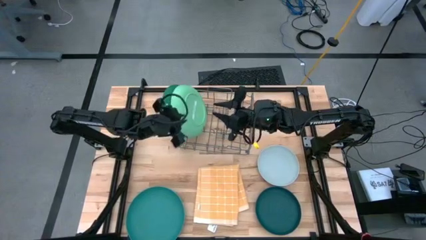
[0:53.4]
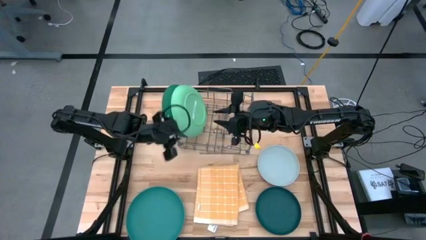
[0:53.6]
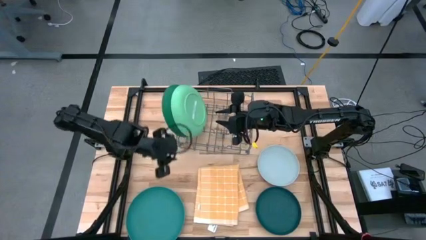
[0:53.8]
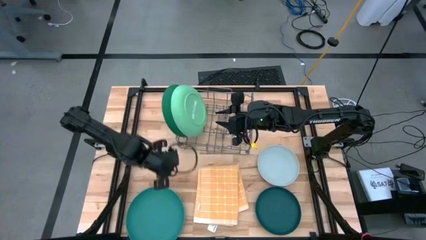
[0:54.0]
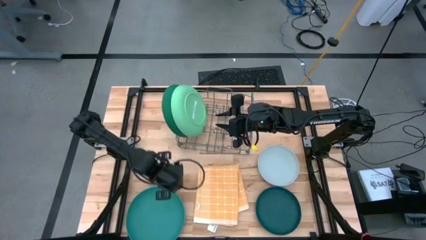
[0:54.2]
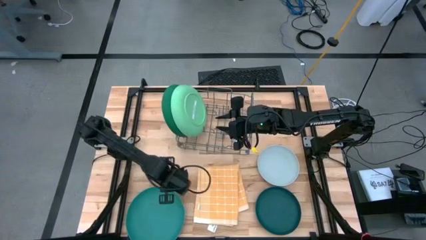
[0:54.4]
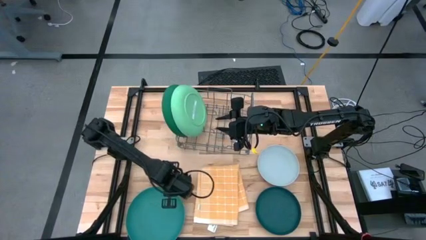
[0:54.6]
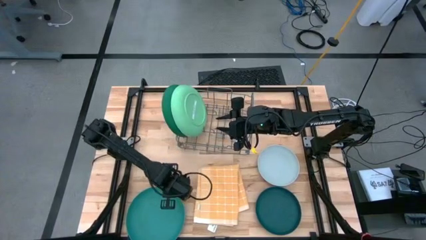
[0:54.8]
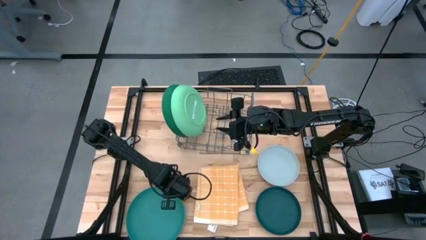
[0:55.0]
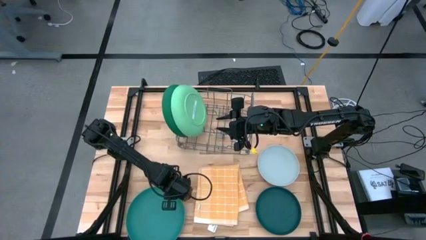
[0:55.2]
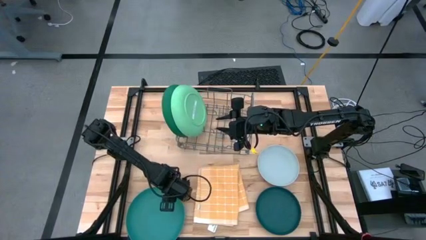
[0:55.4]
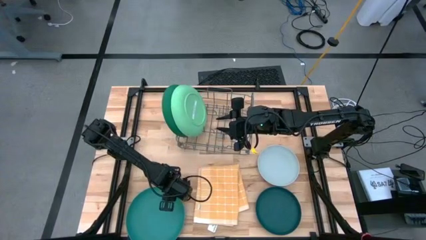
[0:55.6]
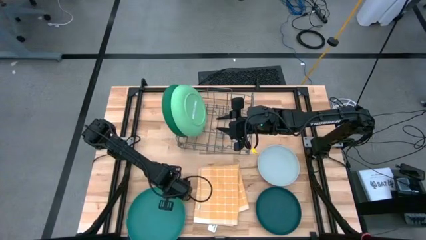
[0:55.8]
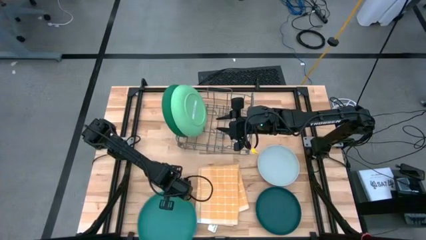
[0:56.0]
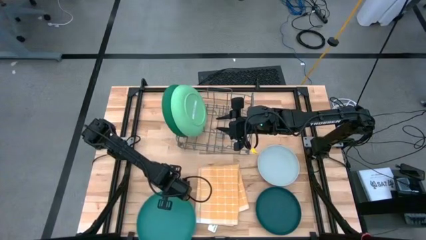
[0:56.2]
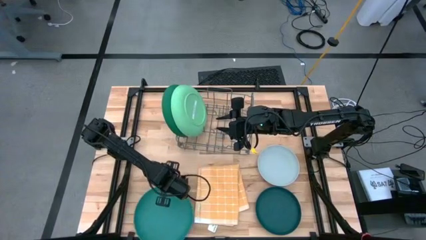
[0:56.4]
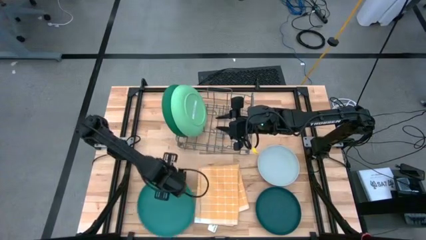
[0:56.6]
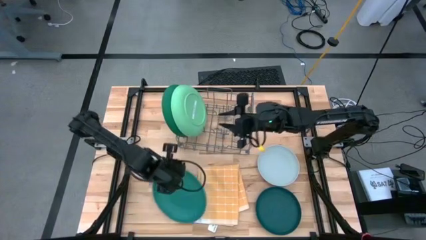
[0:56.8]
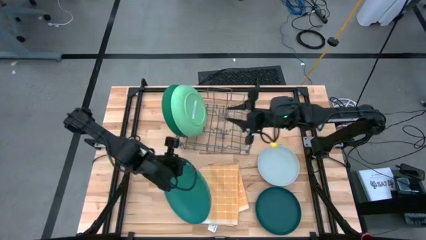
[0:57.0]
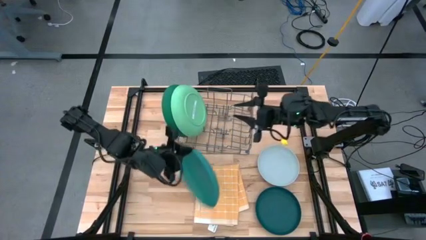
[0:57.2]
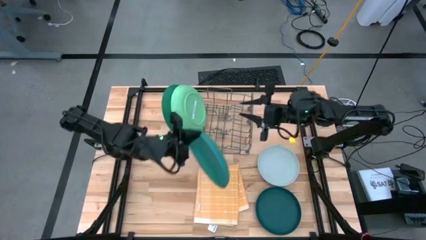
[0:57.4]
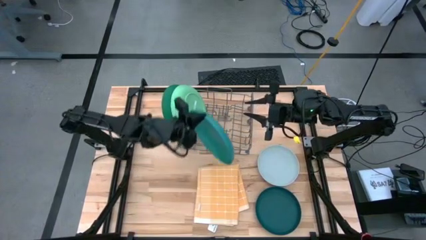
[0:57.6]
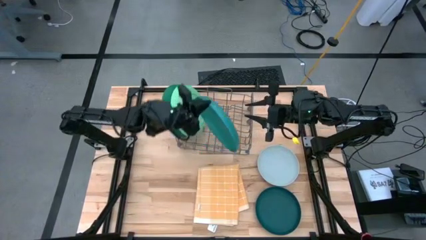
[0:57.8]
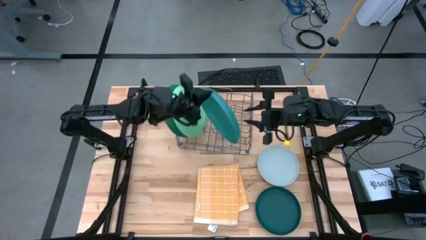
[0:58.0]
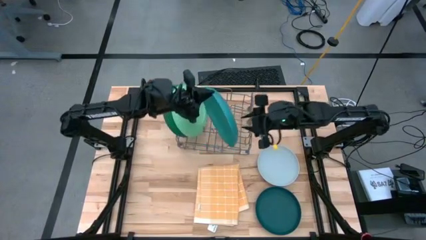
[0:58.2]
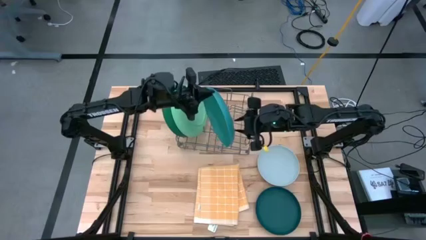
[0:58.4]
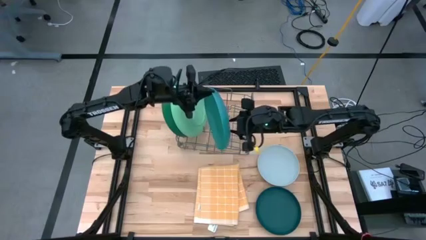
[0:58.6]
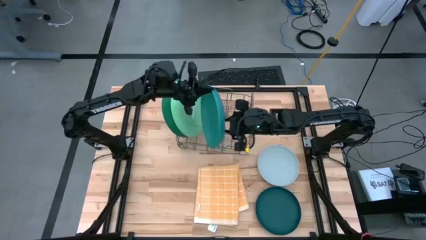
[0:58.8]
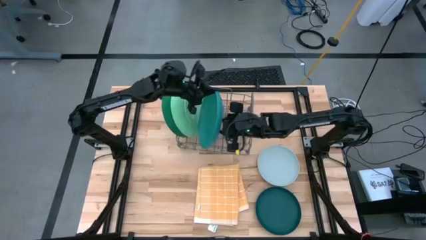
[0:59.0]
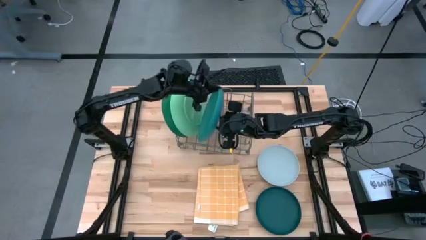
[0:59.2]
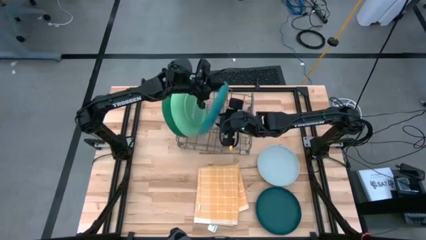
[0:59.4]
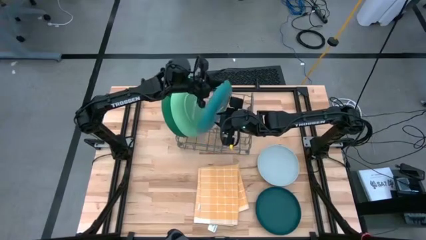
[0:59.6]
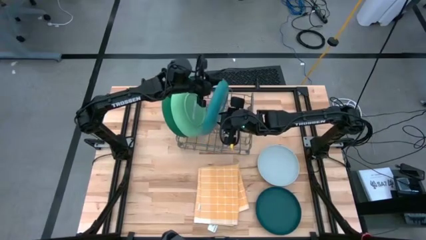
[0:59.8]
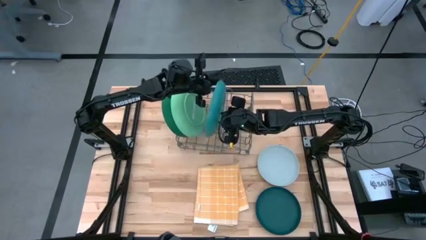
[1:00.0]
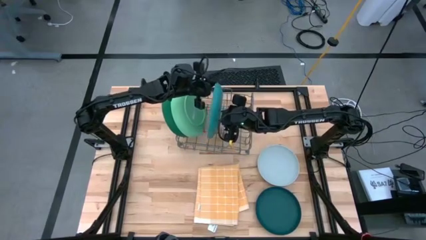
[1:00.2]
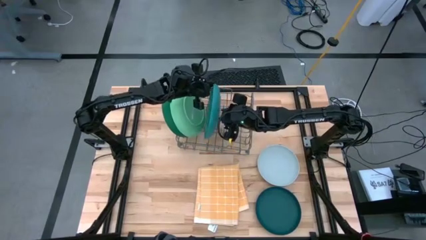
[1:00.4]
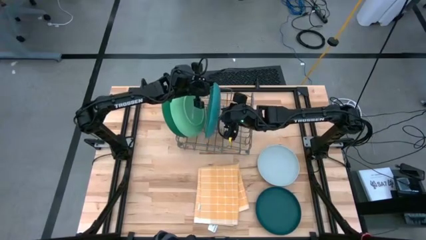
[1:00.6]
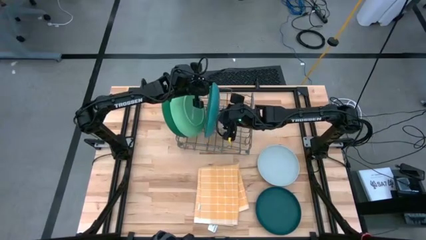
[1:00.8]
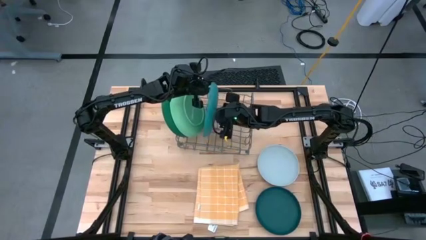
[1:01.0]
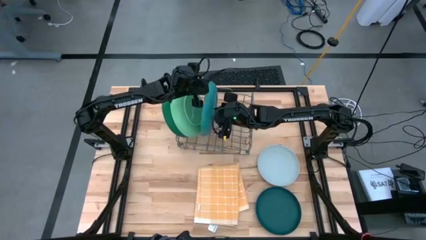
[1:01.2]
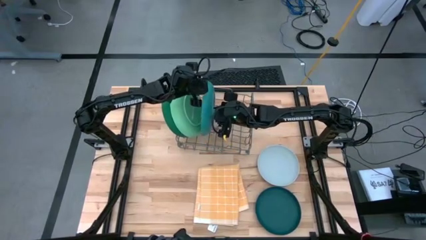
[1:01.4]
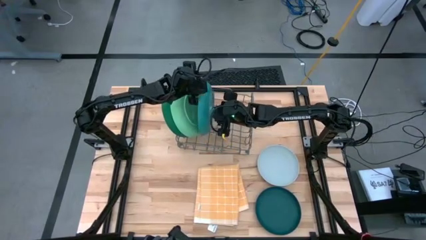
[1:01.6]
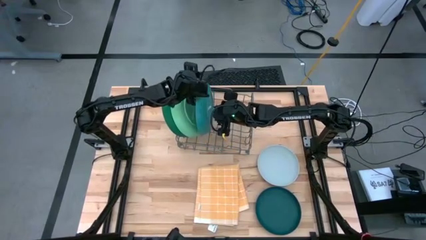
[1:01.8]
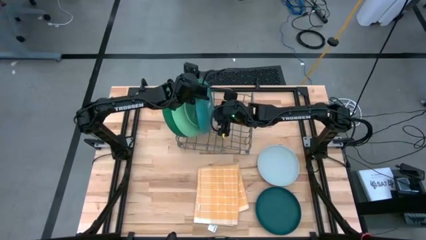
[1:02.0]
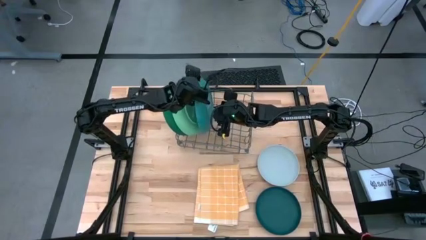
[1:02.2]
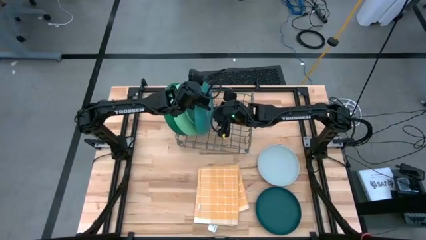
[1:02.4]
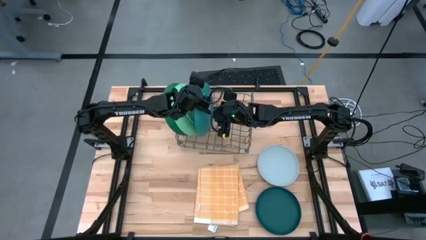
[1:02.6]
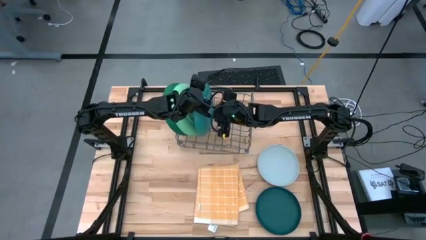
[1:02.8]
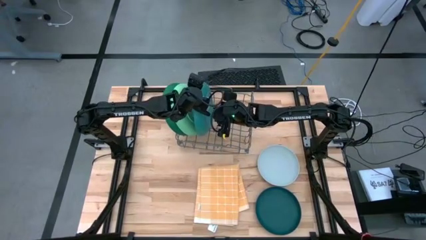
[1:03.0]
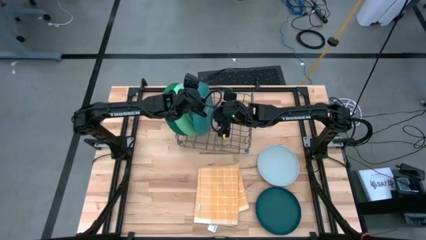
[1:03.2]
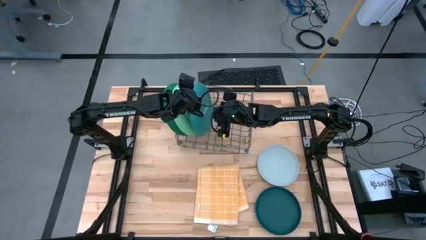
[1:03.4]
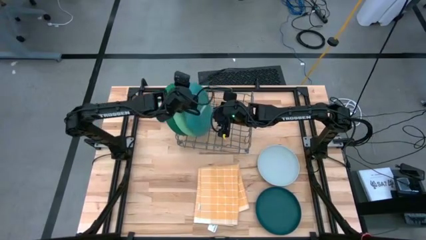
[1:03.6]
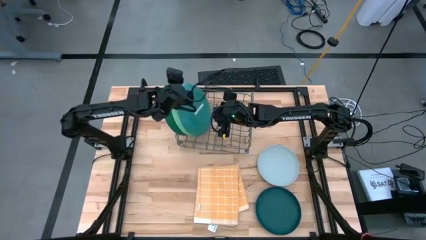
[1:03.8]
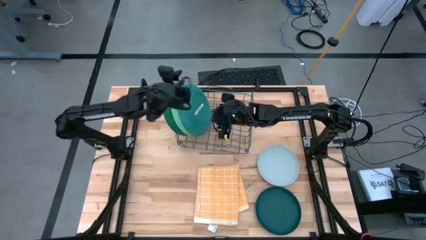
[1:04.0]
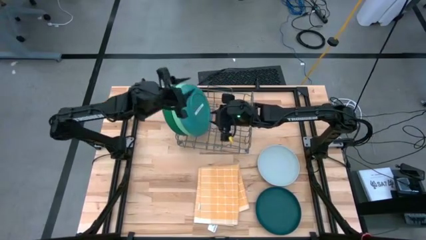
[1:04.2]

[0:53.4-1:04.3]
Task: Sort dishes
Put the blue plate in the dish rack
